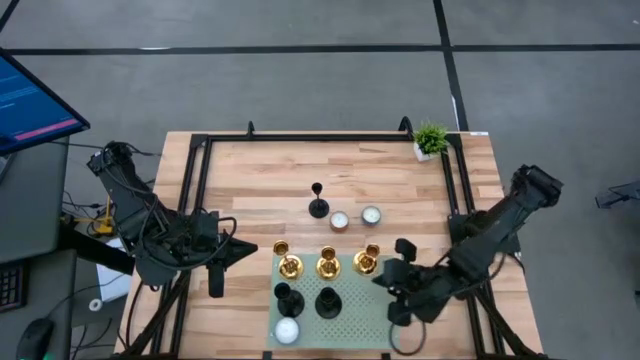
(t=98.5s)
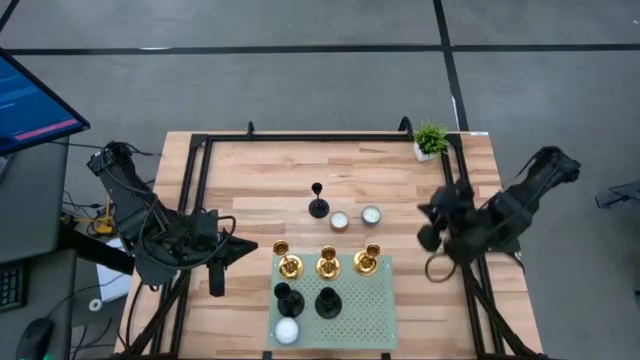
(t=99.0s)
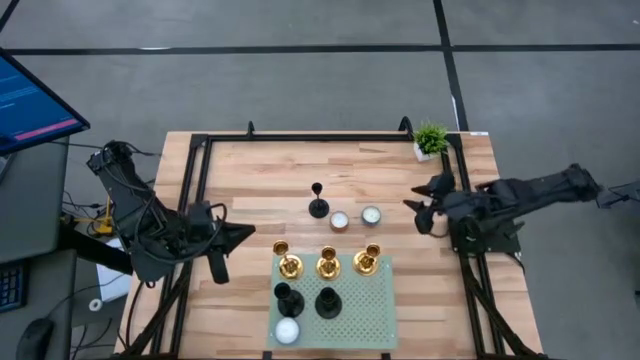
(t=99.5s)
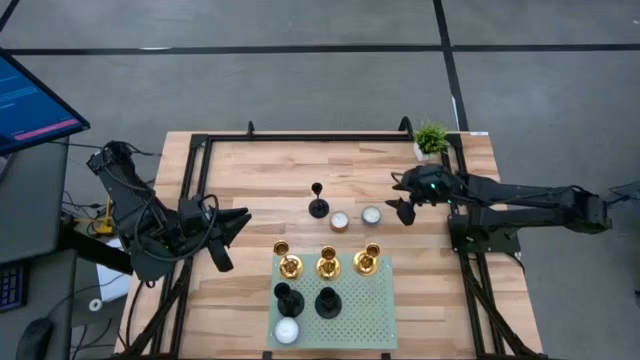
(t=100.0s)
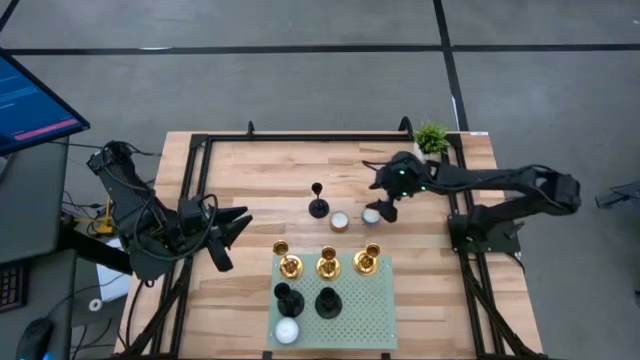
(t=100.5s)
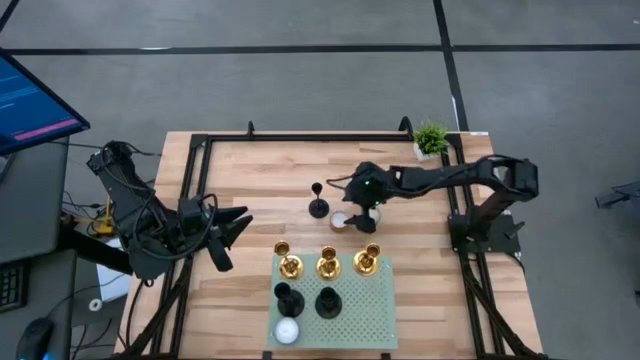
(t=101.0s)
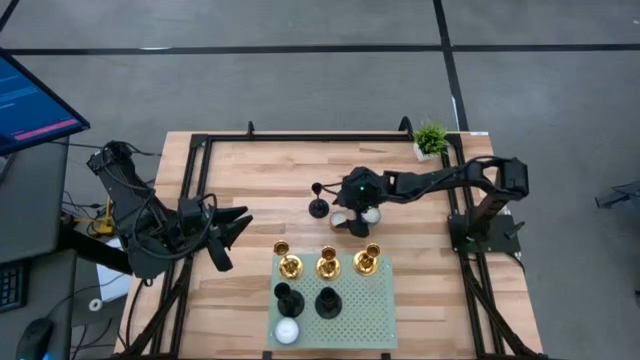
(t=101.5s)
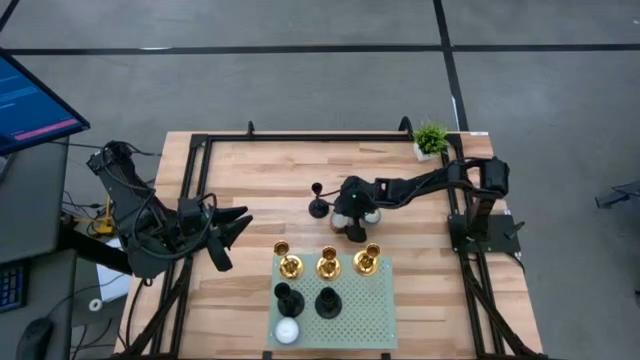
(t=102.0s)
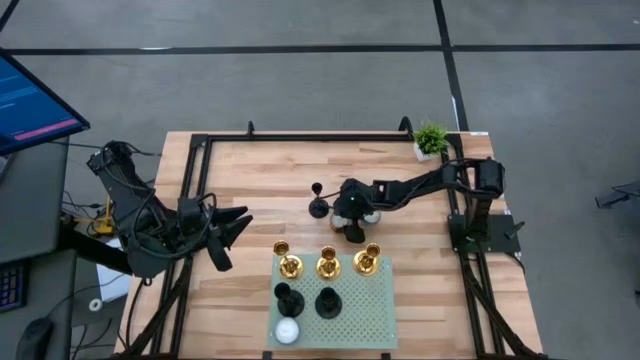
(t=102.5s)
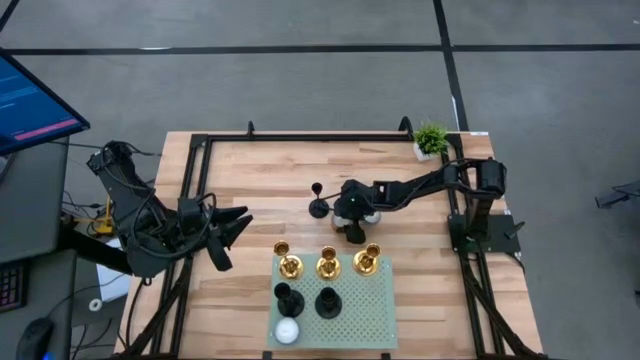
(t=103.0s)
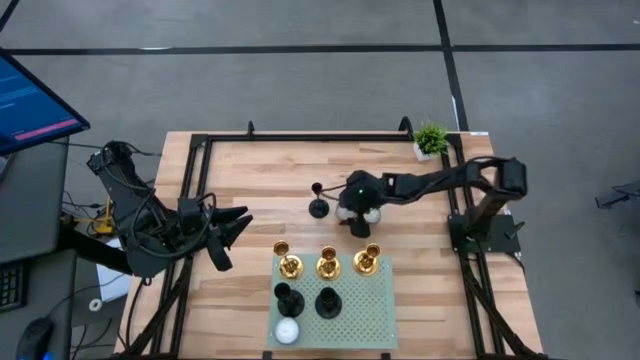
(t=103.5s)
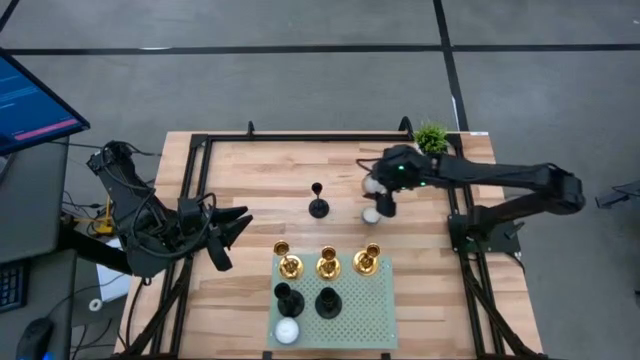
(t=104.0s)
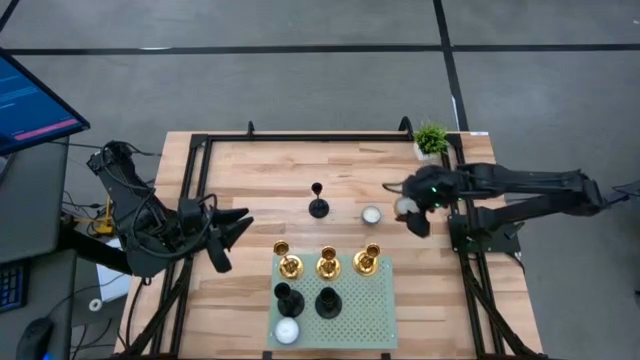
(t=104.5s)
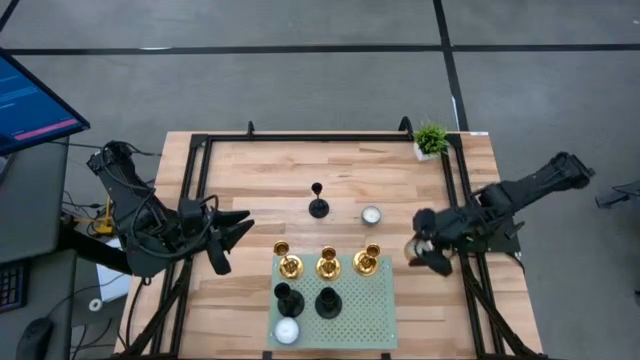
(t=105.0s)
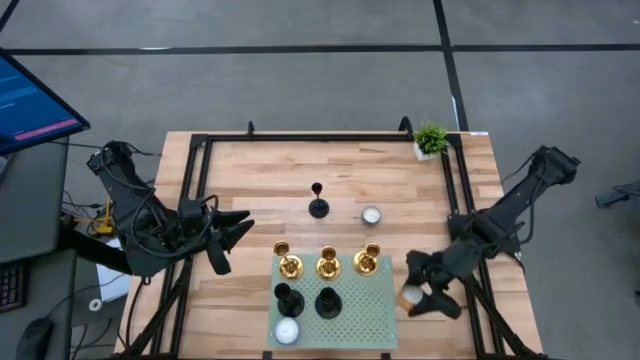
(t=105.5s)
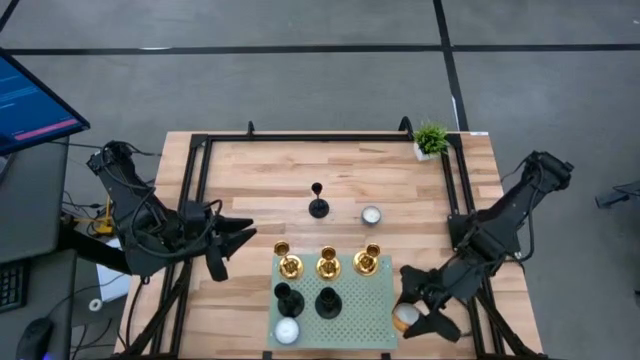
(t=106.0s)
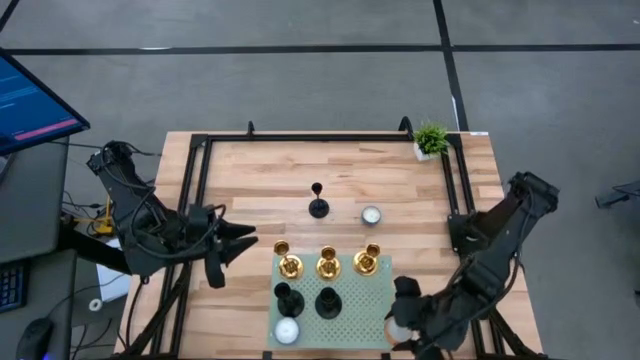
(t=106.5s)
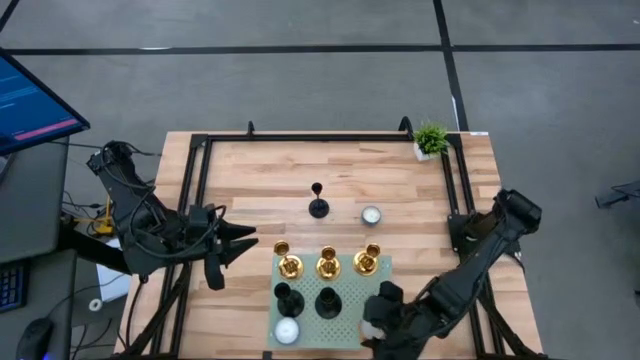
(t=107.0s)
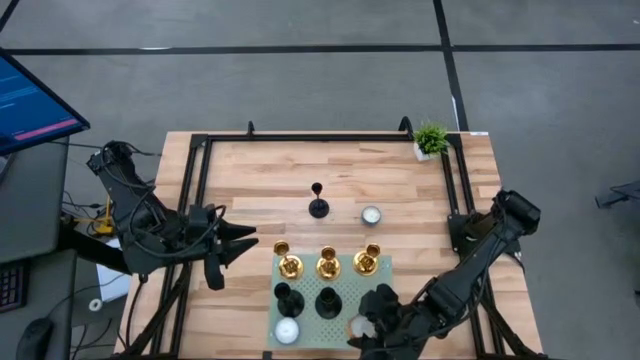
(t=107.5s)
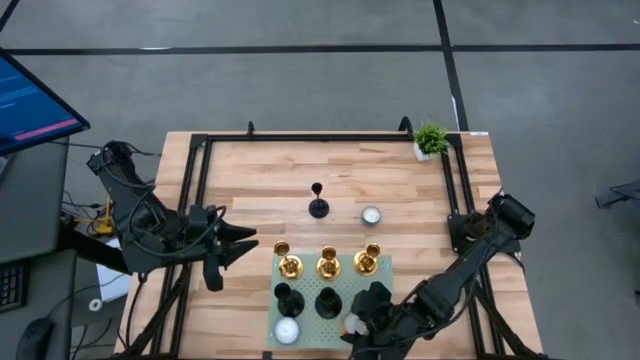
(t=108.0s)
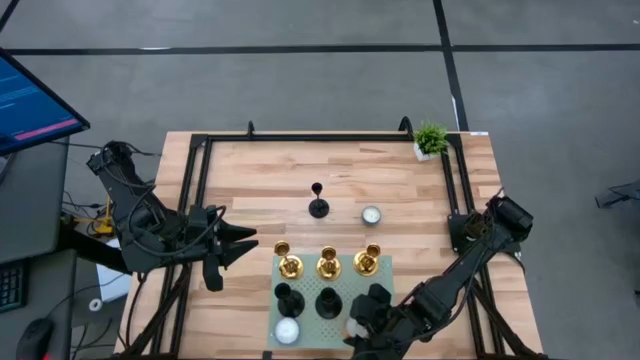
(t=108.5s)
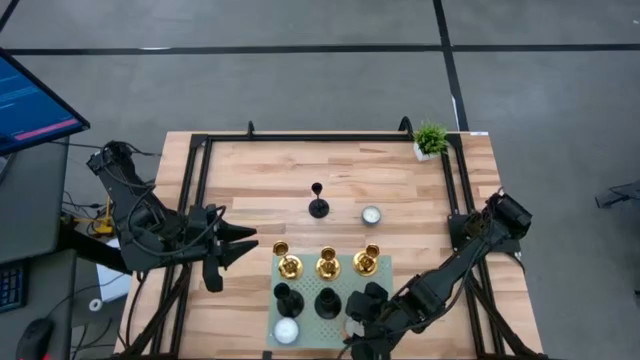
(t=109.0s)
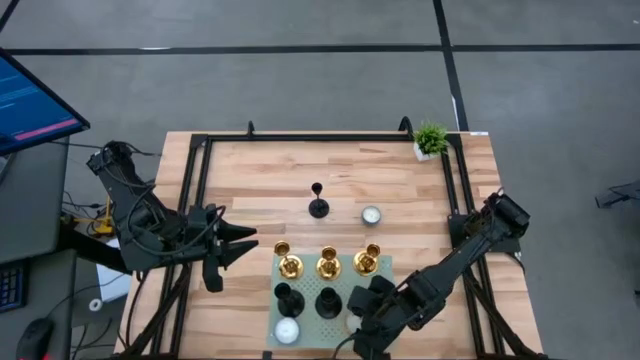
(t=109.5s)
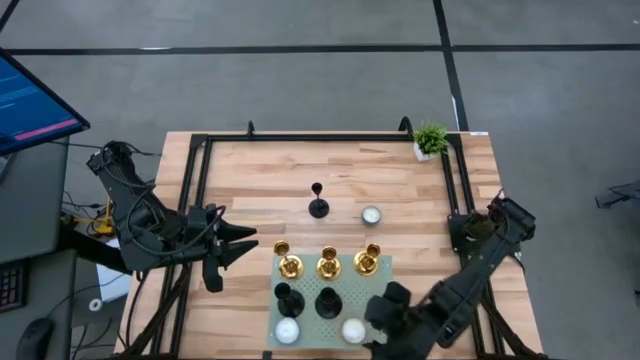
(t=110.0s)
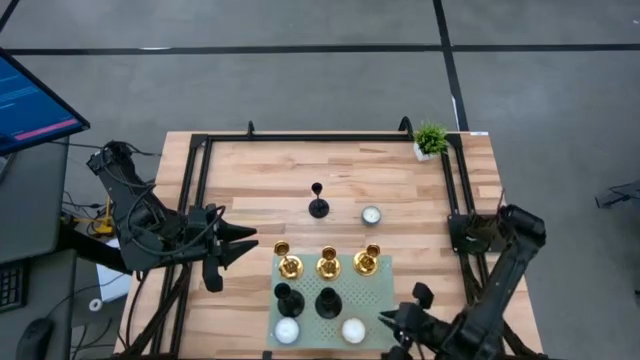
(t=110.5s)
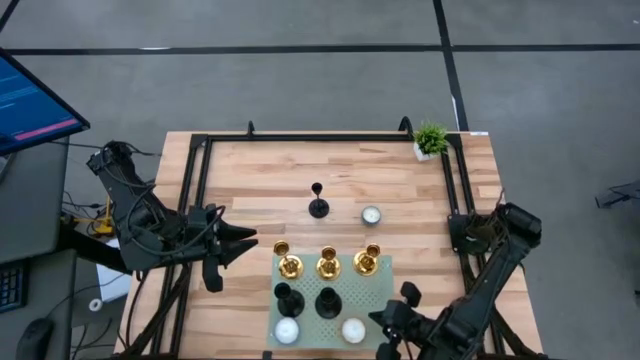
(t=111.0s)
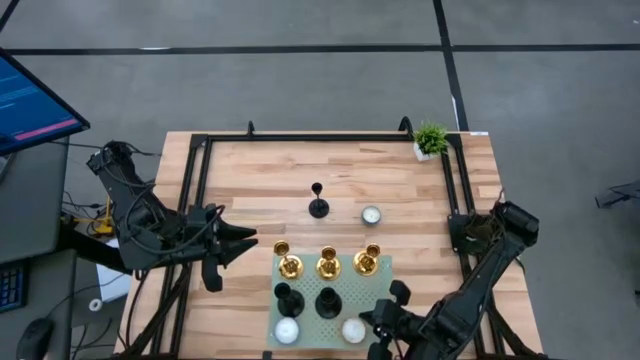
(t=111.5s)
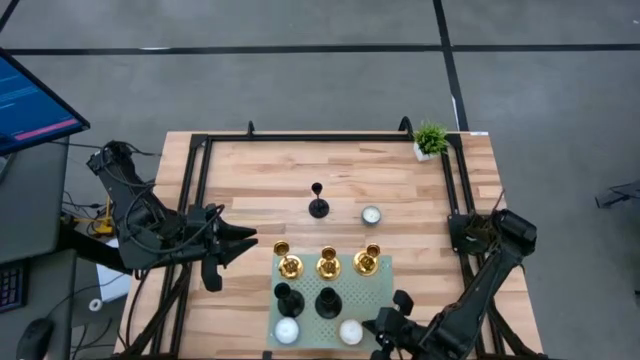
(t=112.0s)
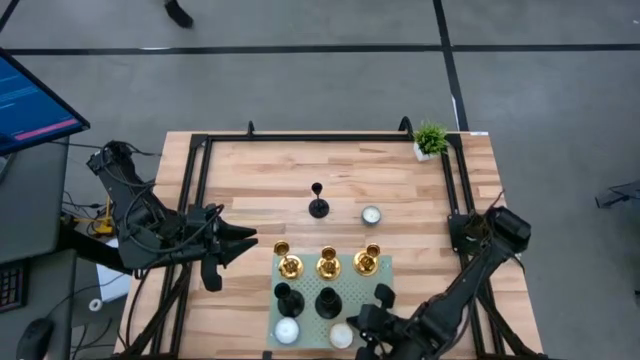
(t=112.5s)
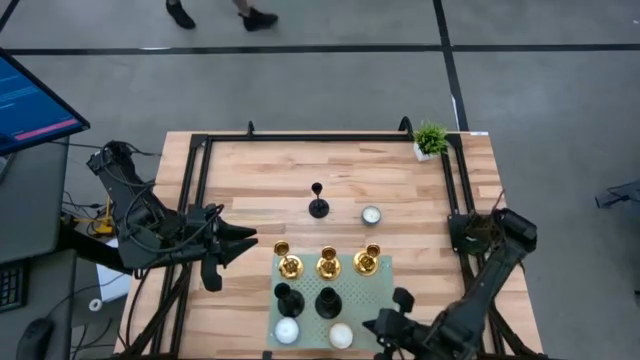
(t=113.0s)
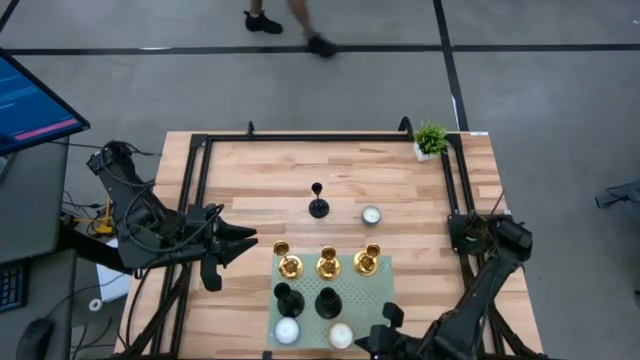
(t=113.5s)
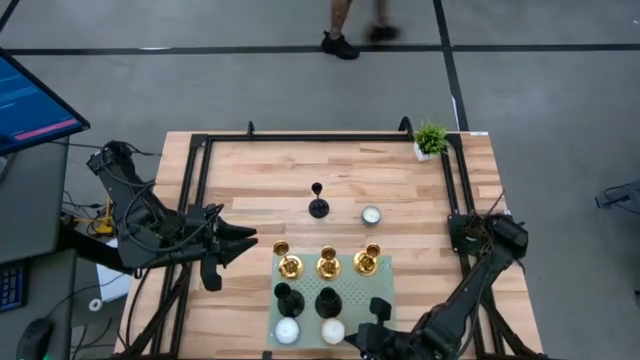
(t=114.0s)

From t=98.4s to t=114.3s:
Task: Pick & Place candle stick holders
Put the orange scented candle on the shelf aligned with the other blue scented candle

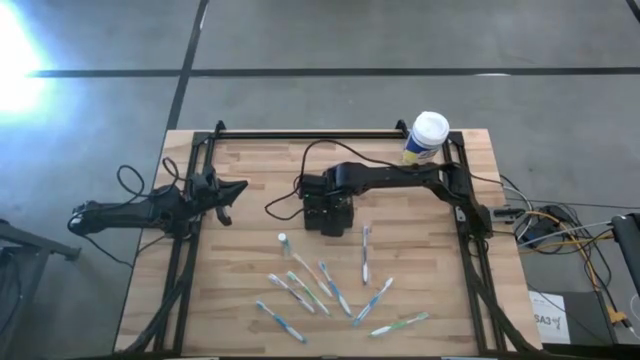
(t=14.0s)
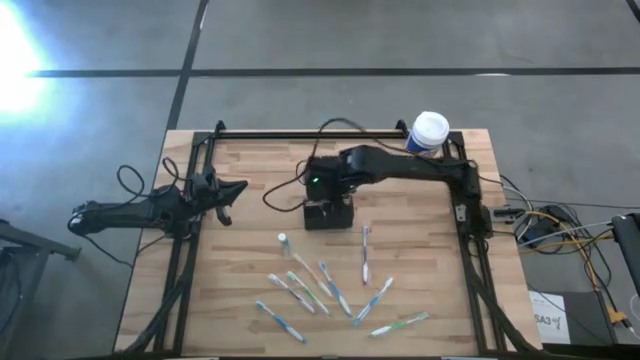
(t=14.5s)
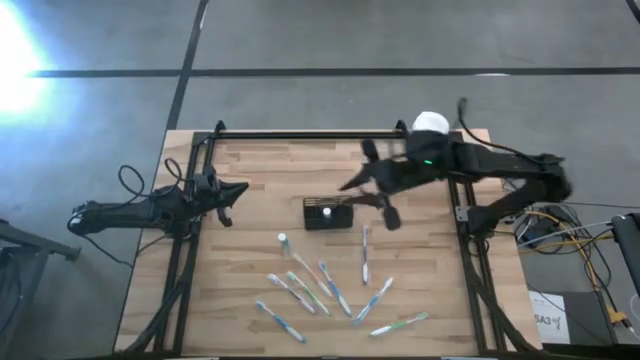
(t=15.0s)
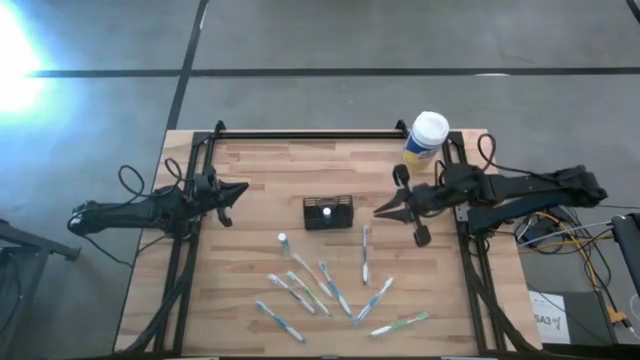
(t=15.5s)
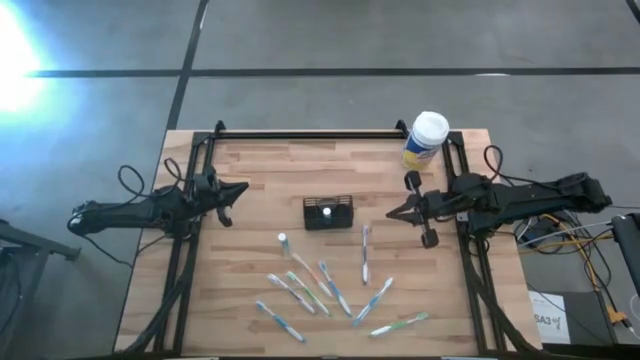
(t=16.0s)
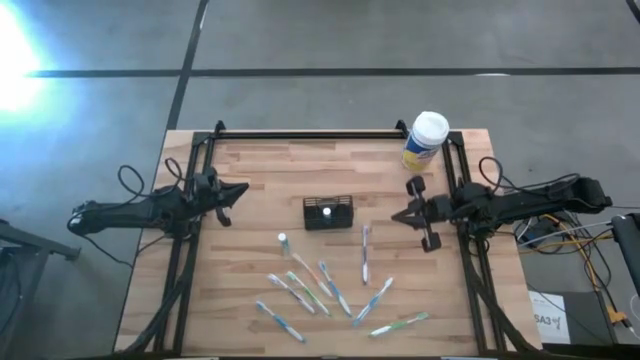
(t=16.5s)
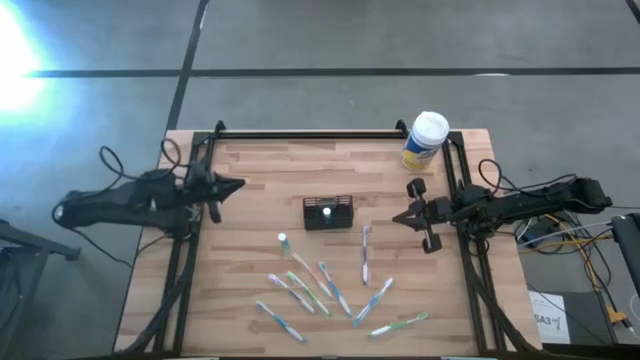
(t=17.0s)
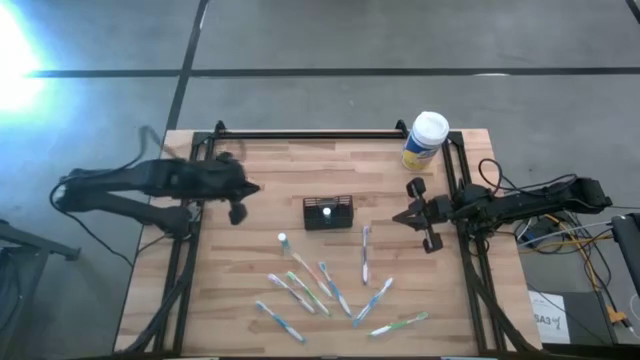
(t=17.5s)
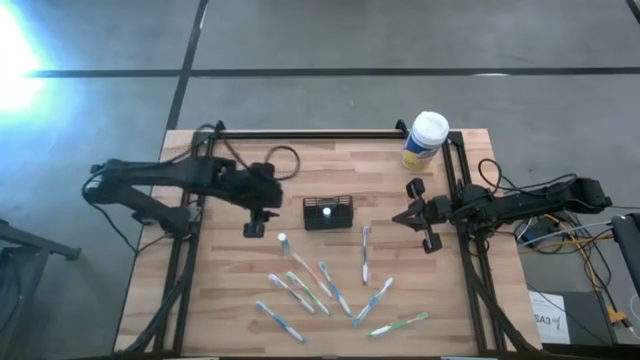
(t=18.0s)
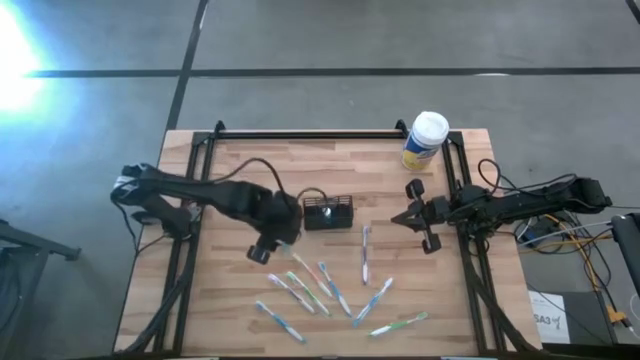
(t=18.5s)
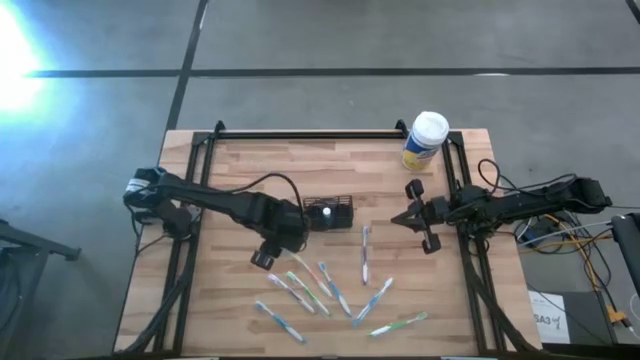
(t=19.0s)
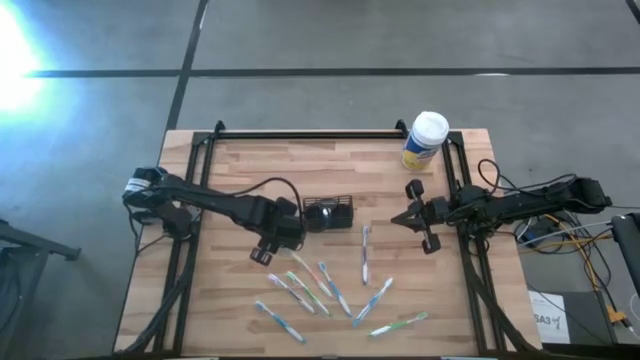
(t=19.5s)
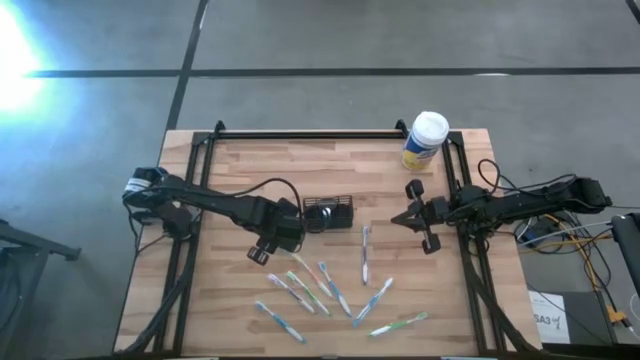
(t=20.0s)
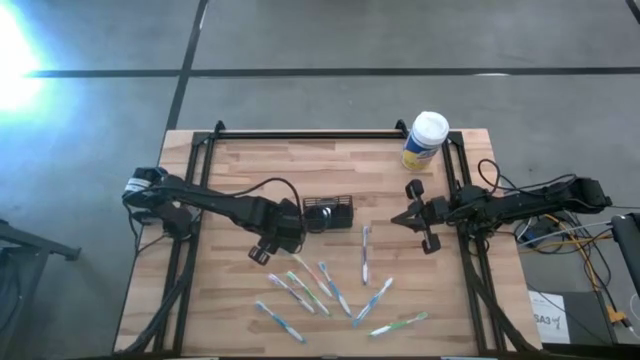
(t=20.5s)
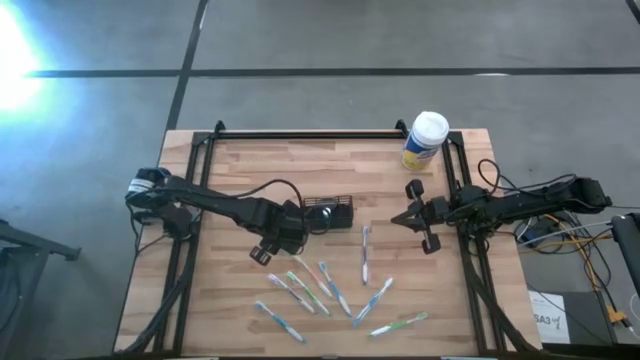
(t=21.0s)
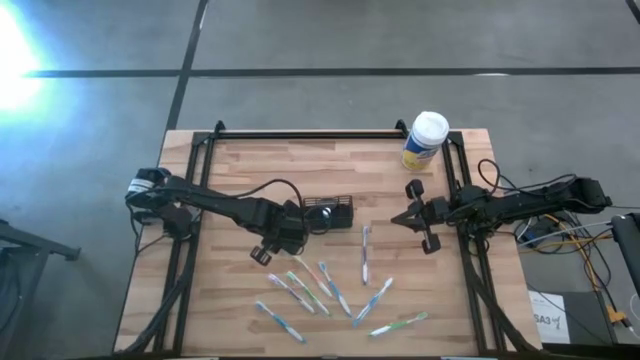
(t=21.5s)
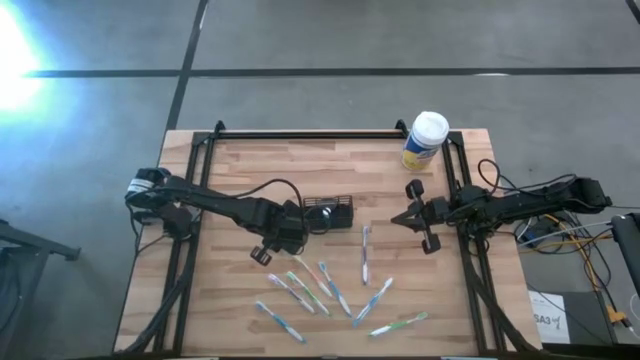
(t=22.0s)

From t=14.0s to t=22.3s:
Task: Pick & Place toothbrushing station
Put the blue mouthwash into the black wire organizer
